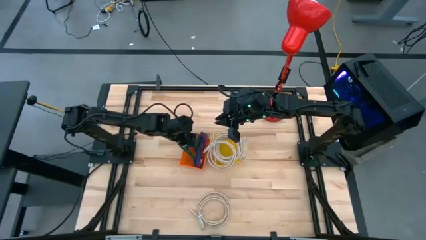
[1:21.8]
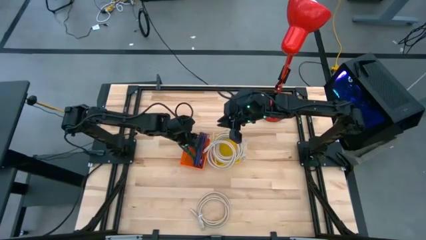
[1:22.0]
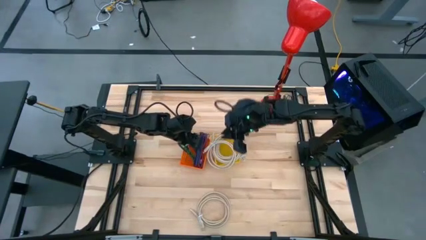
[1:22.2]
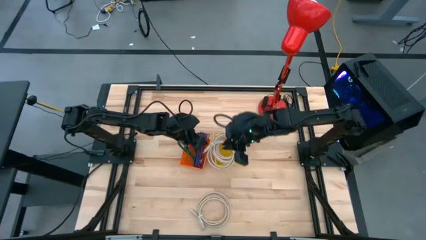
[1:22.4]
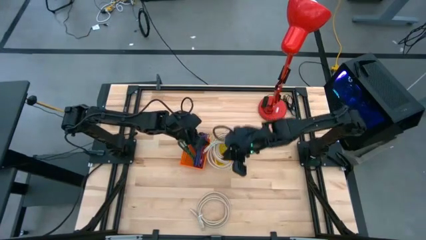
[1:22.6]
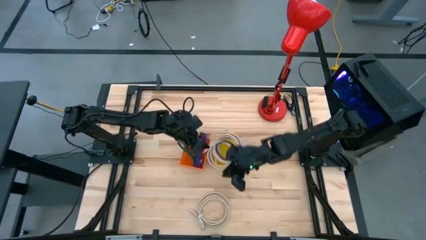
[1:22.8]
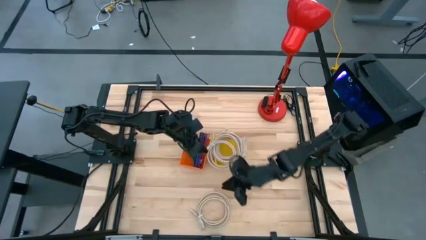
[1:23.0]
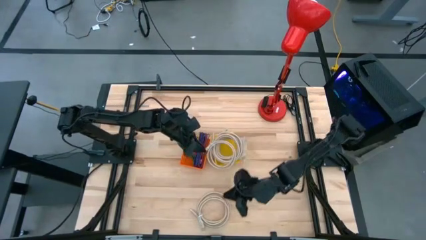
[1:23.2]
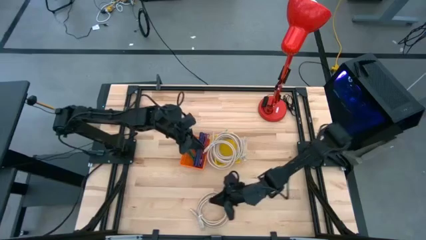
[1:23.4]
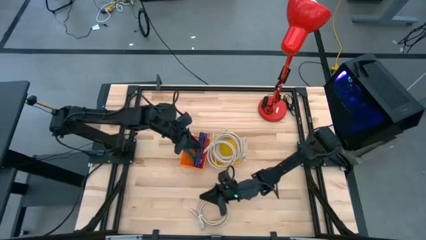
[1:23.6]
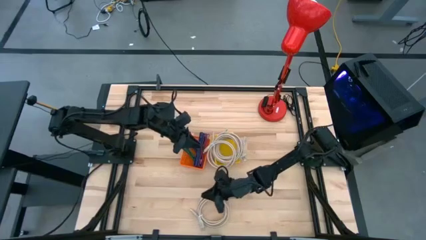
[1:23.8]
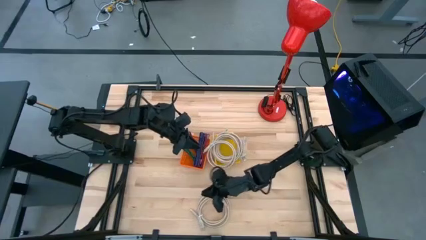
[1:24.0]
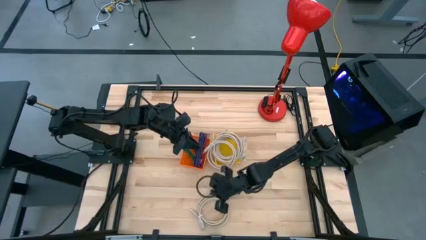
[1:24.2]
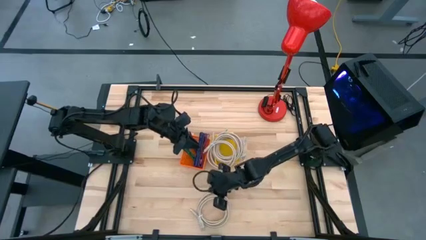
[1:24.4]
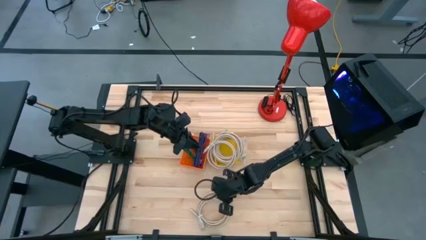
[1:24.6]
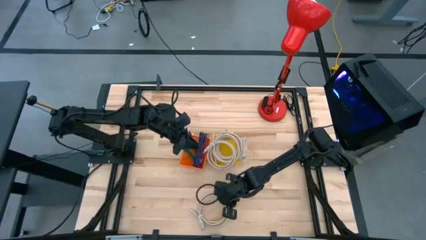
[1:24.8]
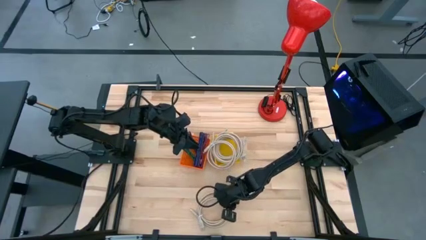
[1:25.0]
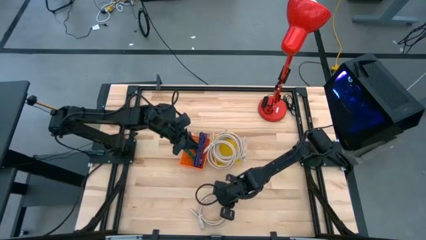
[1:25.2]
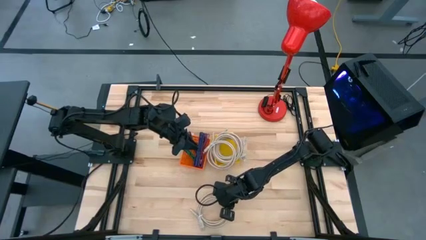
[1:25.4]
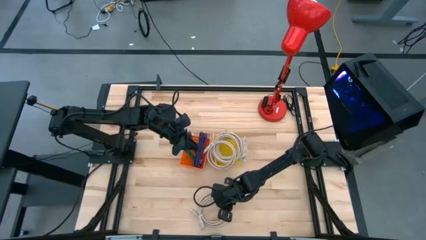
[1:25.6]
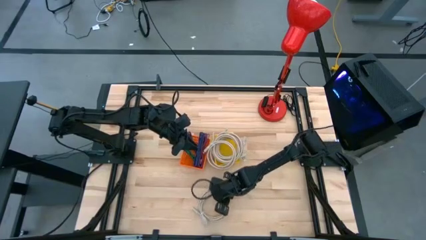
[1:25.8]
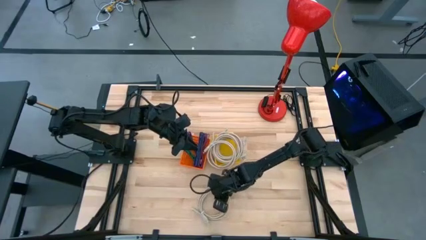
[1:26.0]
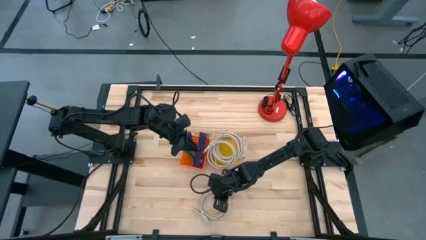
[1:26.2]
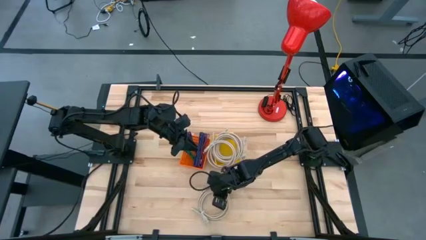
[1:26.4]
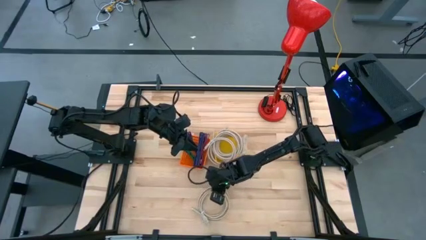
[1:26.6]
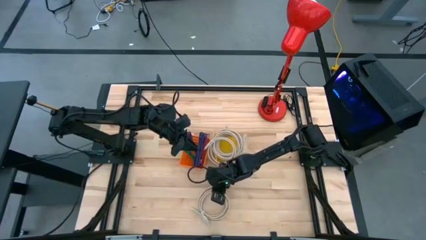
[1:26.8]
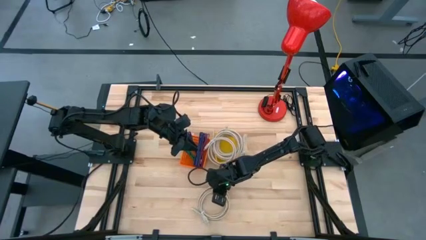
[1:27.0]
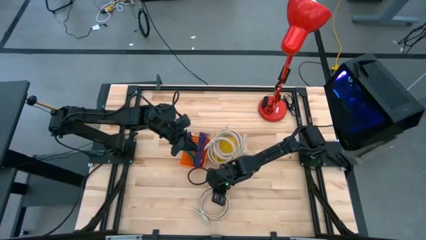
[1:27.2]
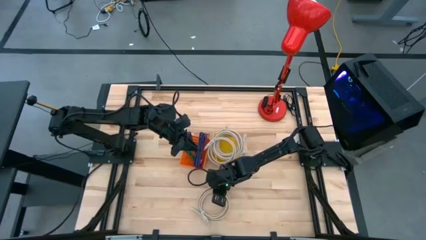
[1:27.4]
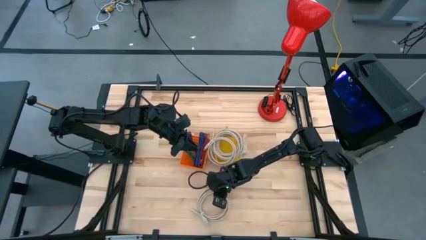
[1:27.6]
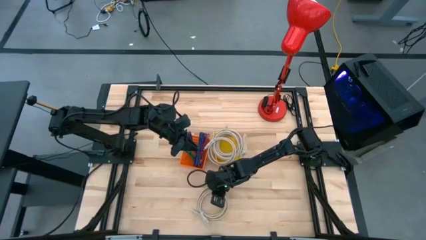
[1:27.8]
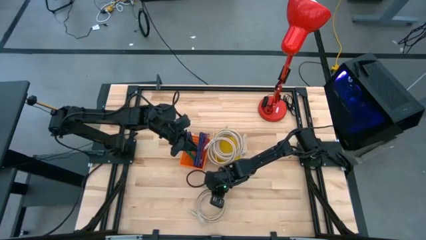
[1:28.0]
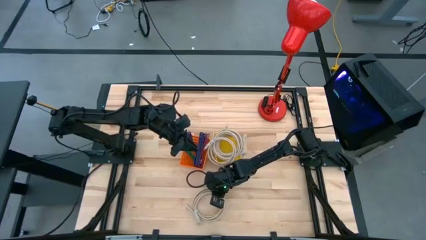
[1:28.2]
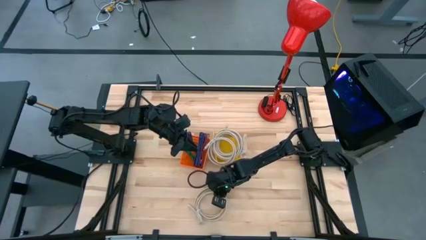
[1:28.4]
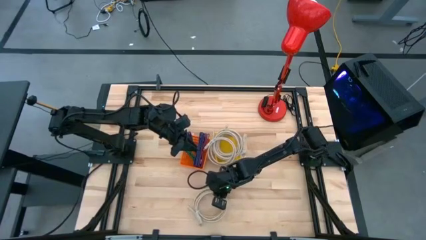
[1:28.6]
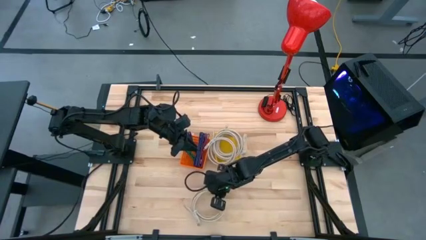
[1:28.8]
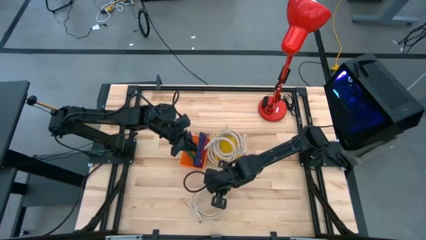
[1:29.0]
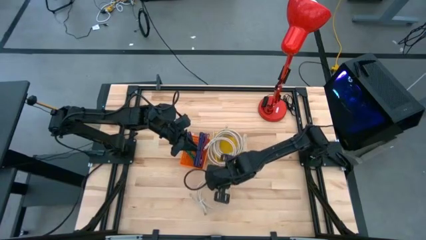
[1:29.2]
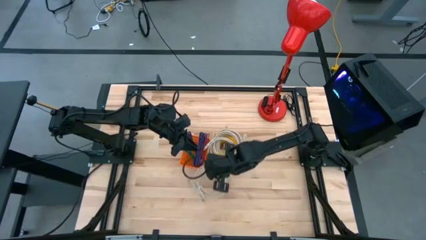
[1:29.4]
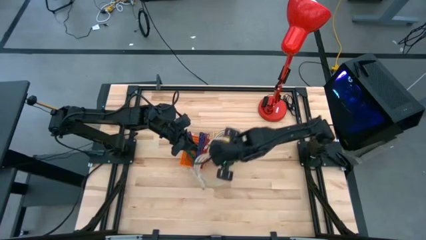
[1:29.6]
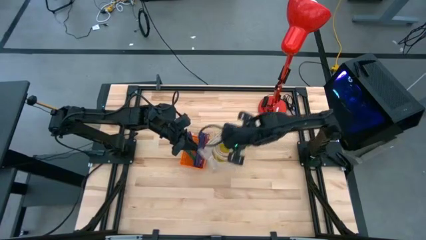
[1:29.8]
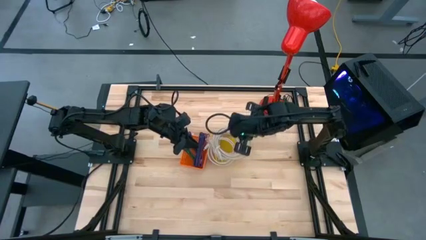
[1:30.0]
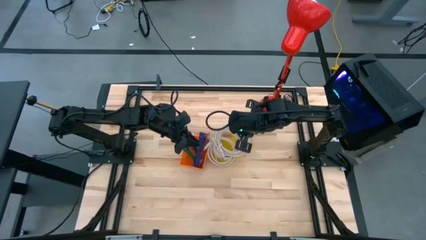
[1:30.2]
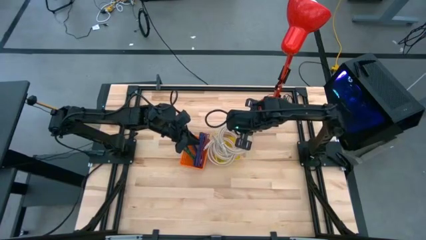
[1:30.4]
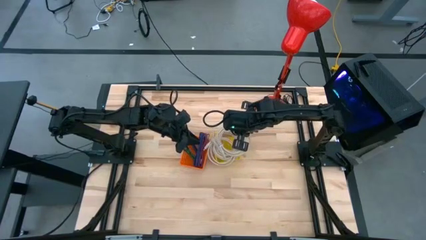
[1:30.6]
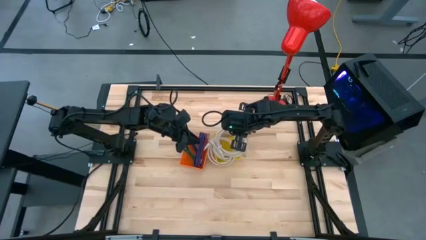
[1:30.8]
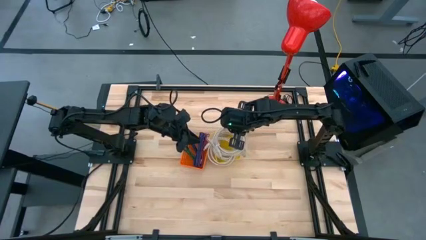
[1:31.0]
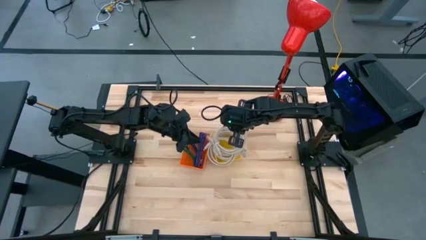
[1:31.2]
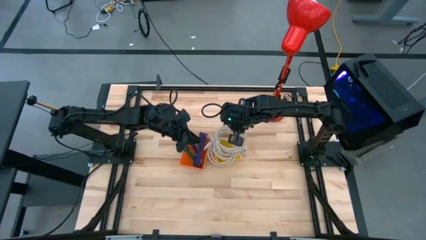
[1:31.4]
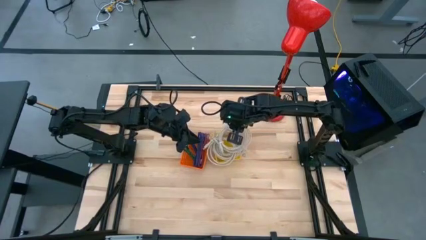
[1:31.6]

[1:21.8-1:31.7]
Task: Pick & Place USB Port
Put the brown HDMI cable into the yellow bin

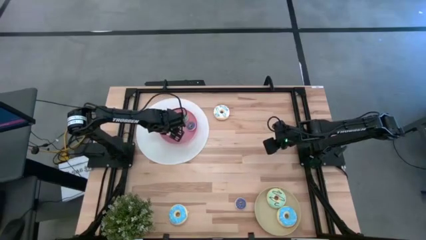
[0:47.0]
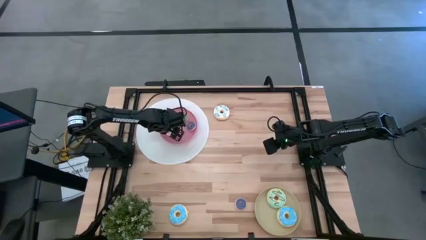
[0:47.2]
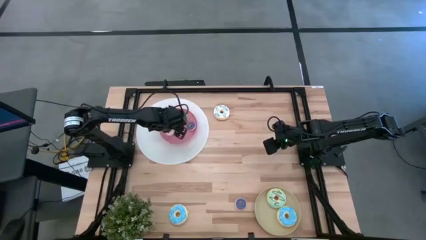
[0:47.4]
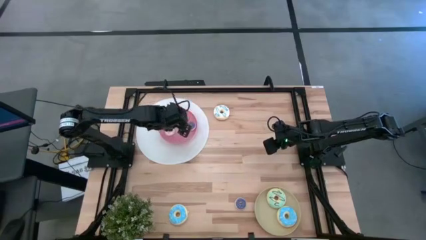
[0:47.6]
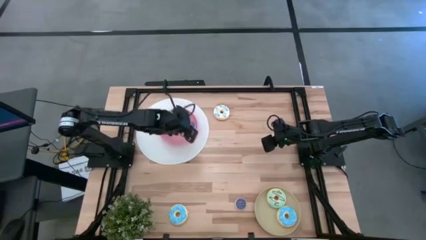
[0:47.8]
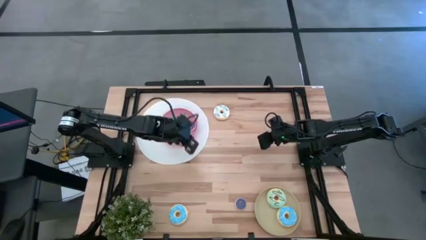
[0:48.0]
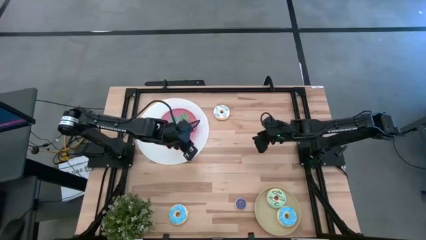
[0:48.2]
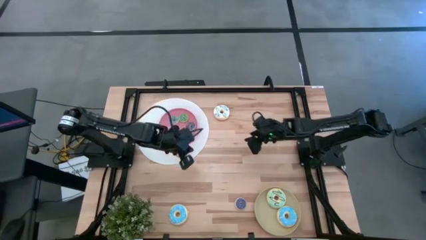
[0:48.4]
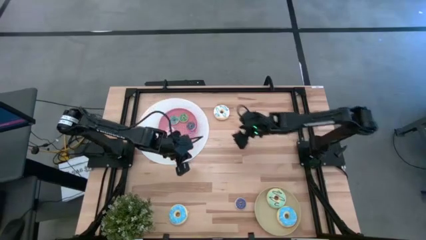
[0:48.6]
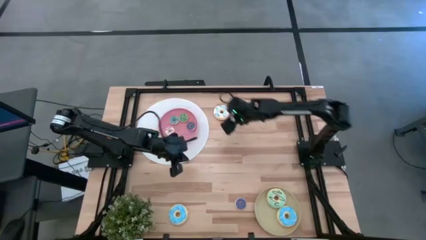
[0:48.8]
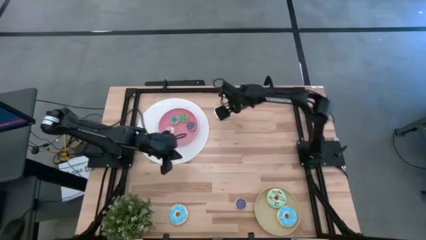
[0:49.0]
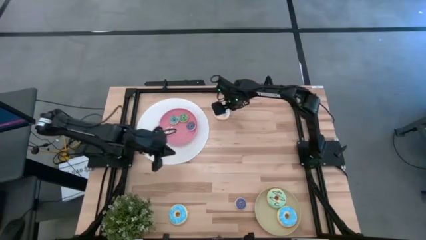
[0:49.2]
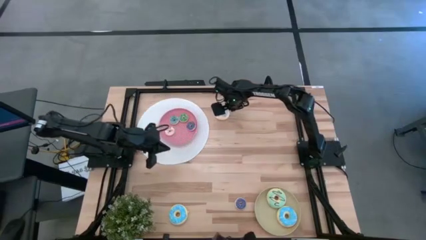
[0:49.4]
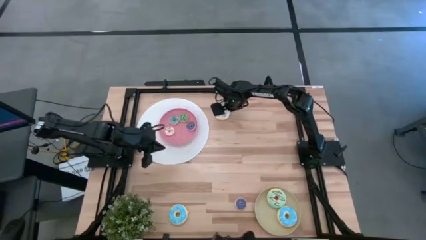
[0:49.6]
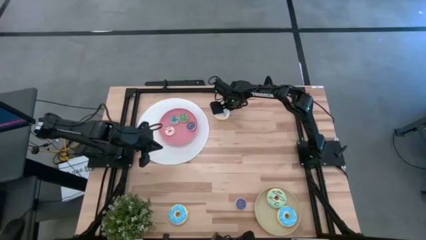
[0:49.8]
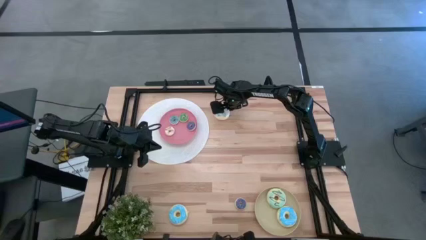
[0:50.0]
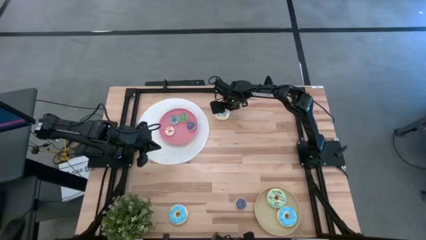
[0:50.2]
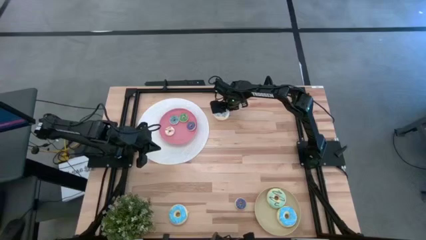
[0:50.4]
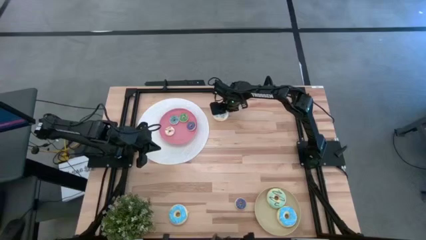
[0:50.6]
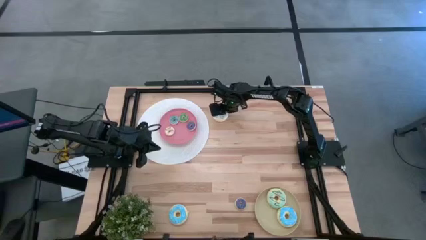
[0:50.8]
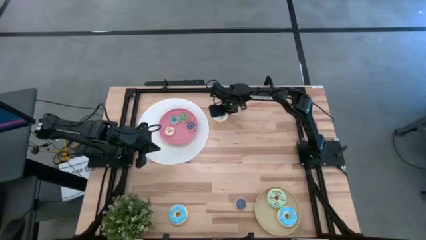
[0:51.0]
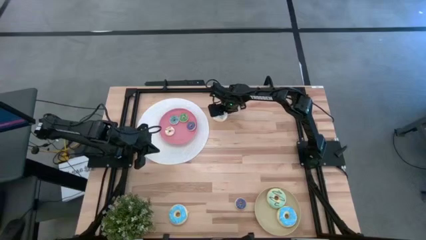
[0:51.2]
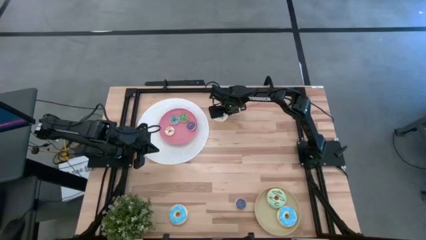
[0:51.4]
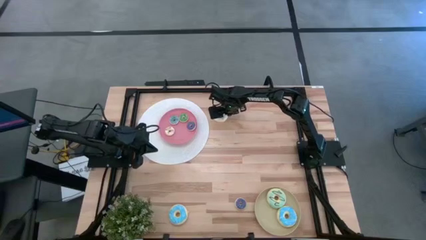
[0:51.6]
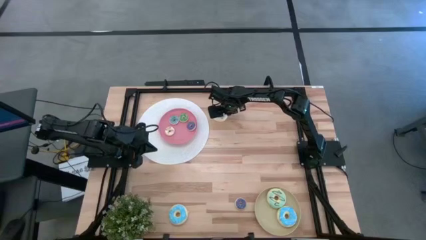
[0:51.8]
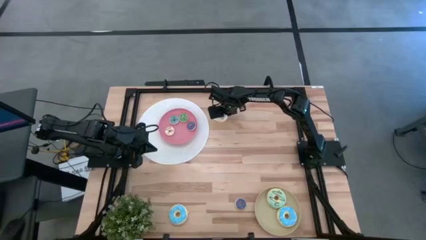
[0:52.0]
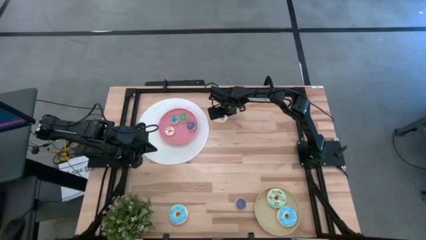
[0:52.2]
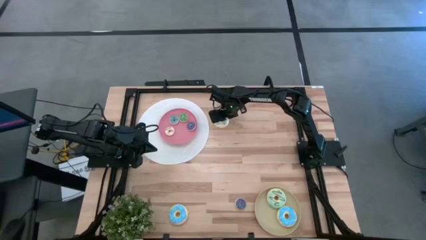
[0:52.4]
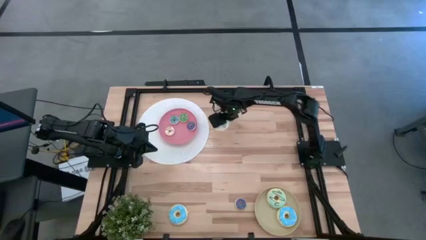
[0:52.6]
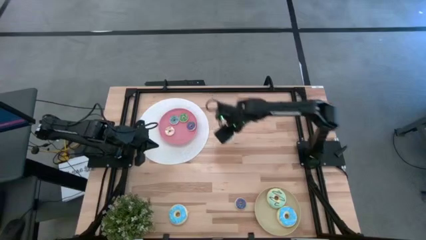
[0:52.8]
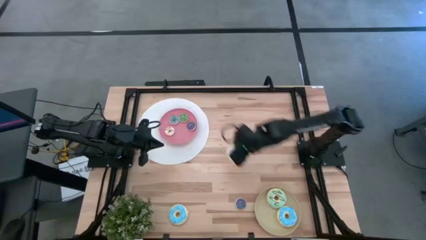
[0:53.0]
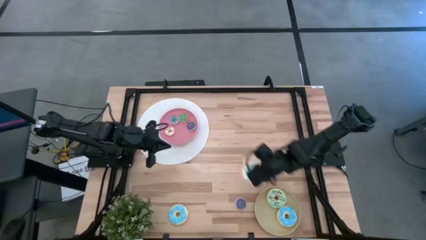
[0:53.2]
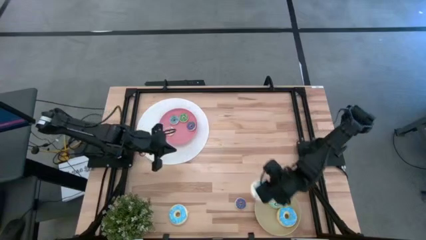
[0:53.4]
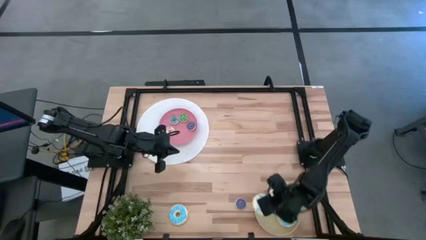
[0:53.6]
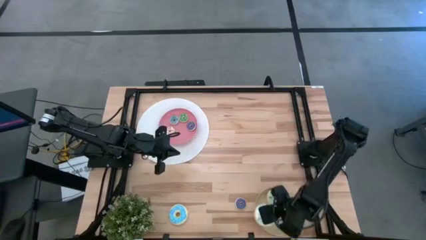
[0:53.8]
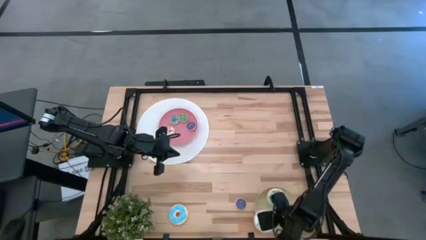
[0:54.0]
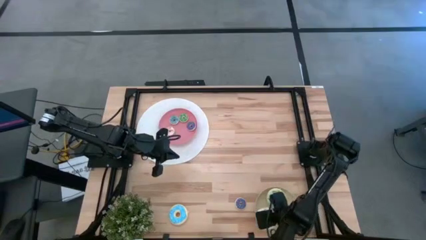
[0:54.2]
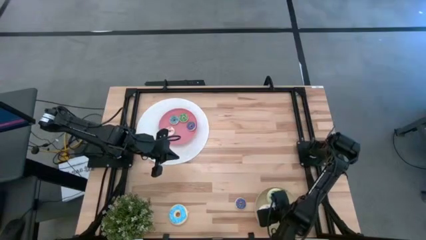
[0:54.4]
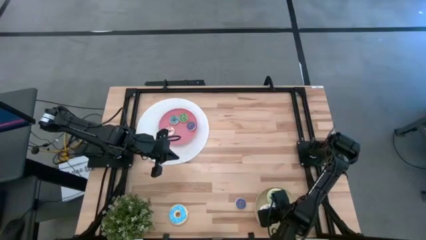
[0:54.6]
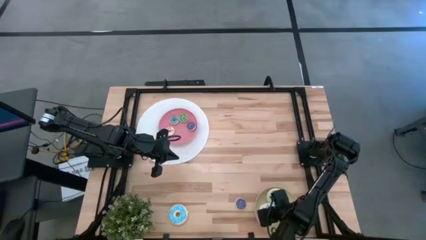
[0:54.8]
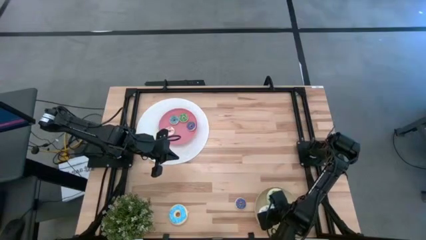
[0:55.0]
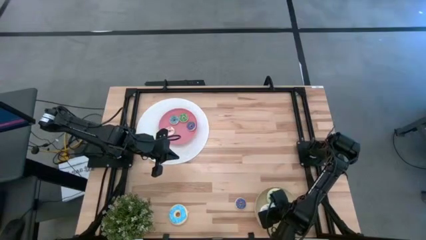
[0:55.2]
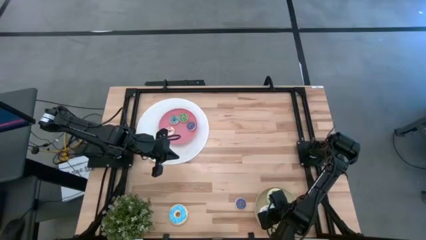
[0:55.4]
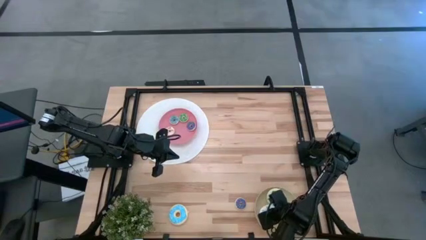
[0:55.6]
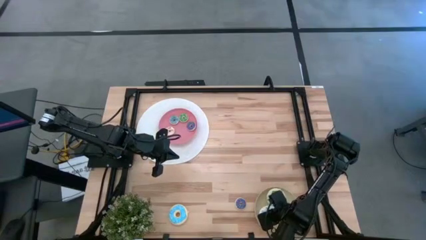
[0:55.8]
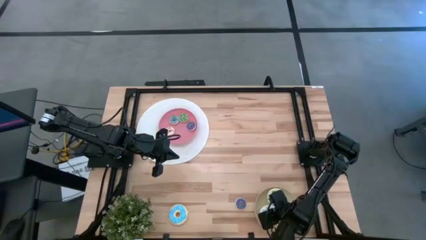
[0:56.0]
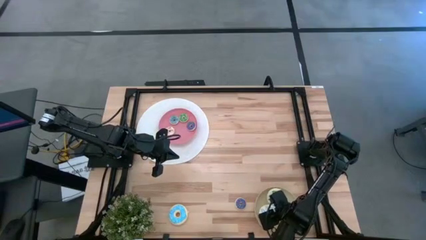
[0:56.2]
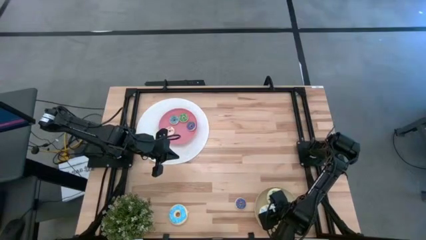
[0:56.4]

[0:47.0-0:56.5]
Task: Pick & Place donuts
Put the large white donut on the brown plate
